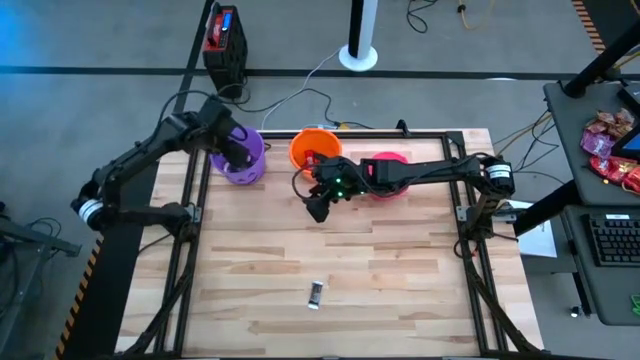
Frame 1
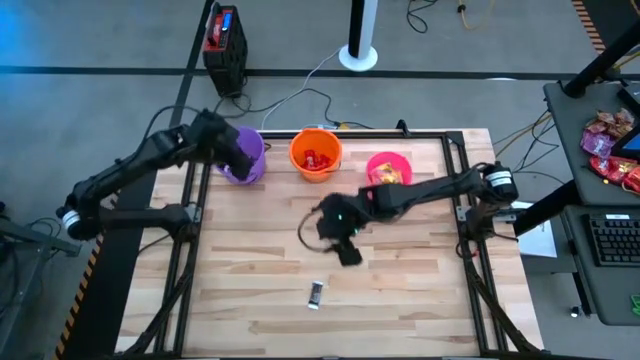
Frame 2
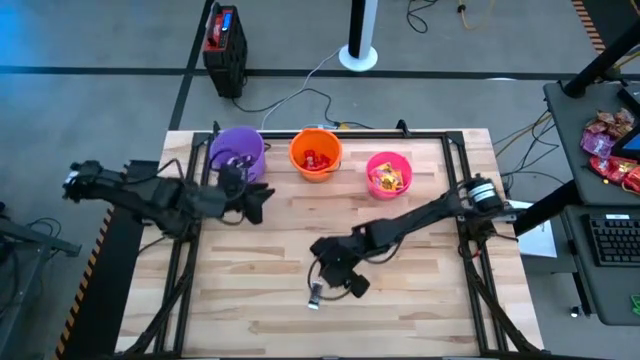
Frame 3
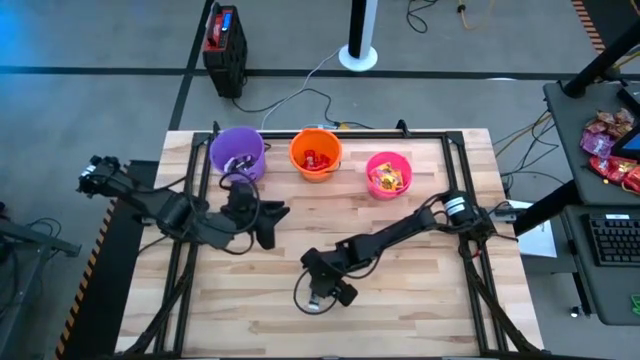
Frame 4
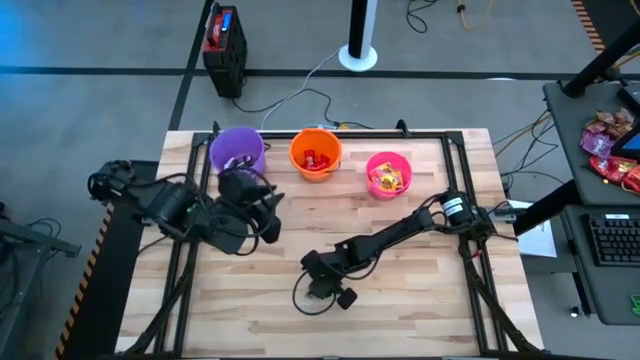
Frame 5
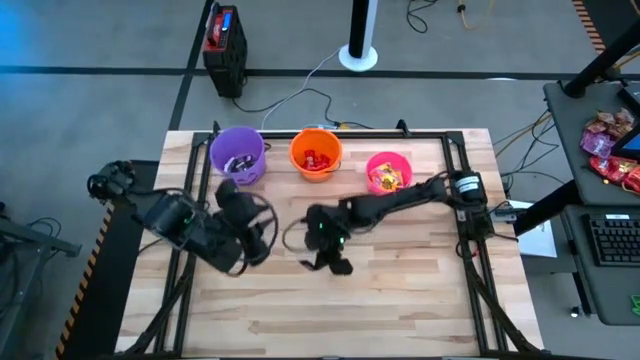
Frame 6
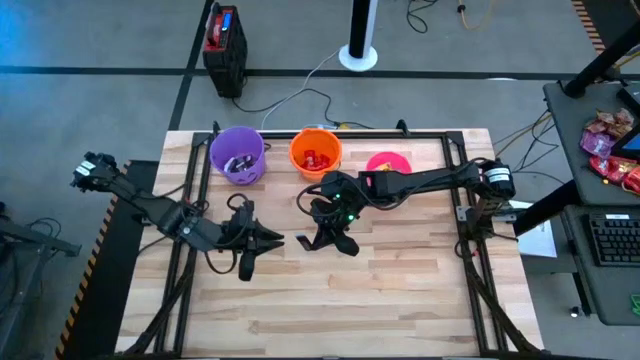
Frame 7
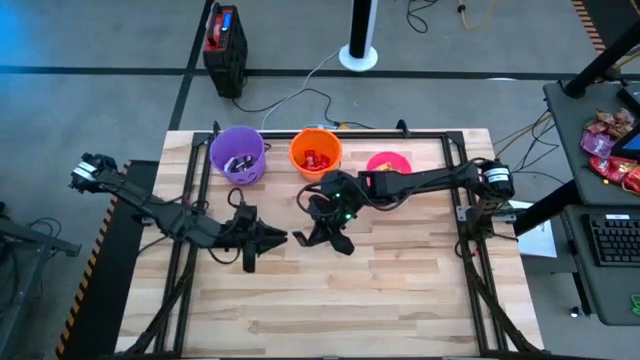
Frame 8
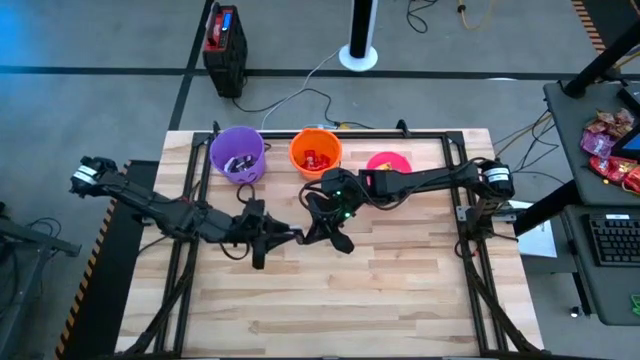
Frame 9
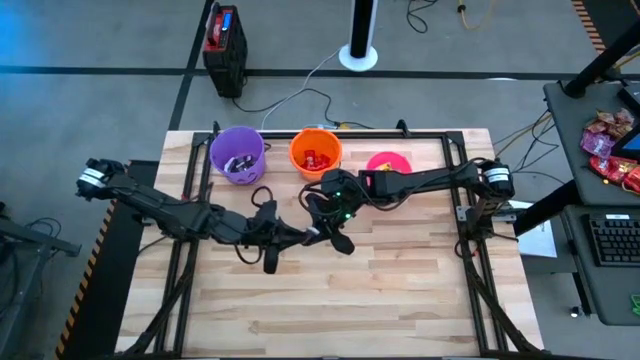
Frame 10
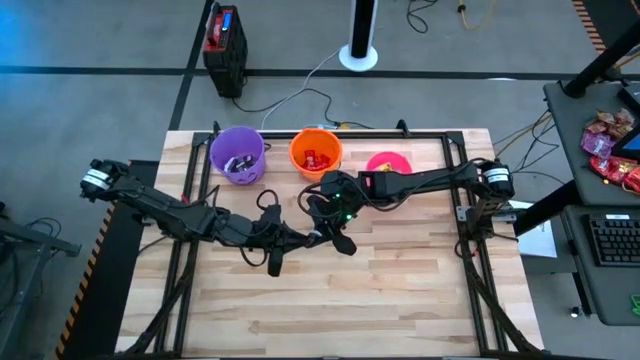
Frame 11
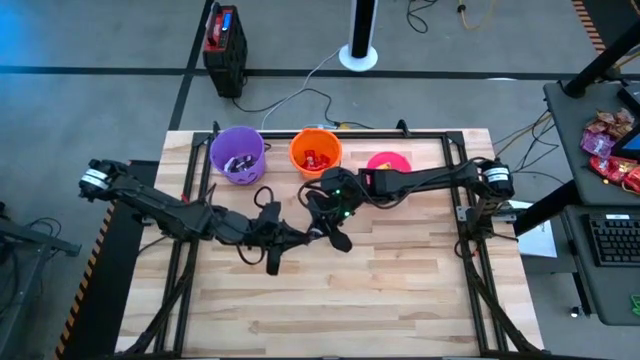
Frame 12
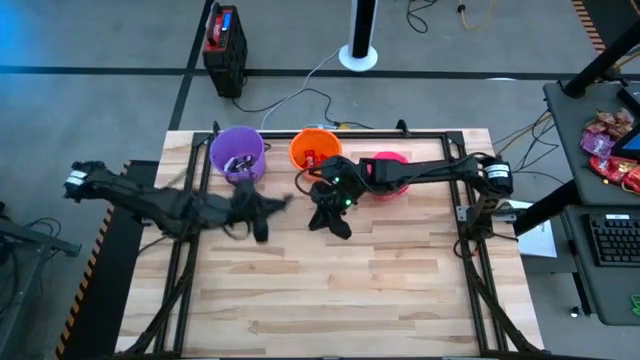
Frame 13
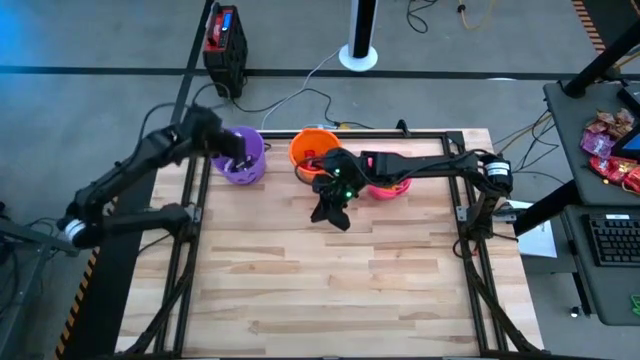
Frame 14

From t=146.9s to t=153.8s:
Task: Sort candy by brand, put in halloween buckets
Put the black candy into the purple bucket

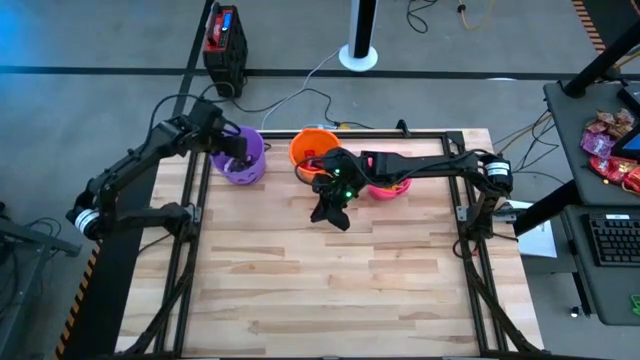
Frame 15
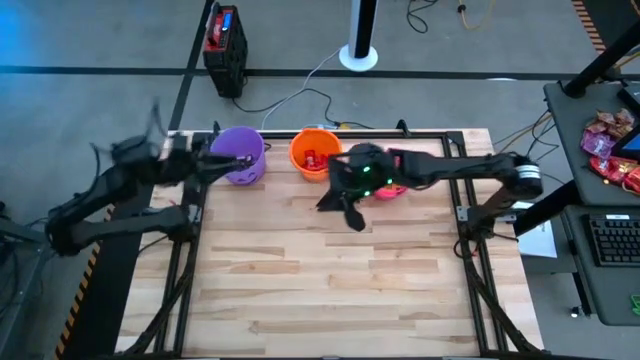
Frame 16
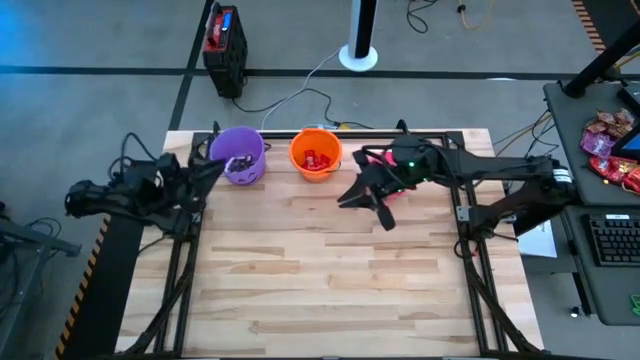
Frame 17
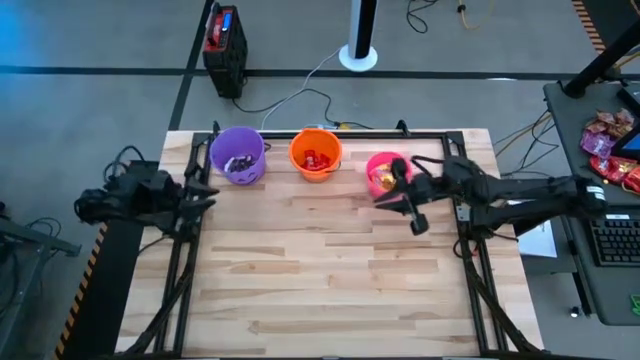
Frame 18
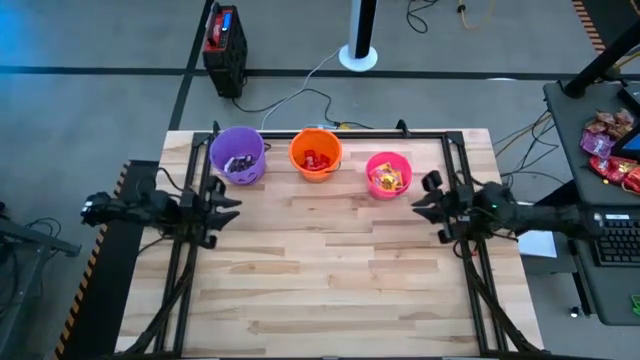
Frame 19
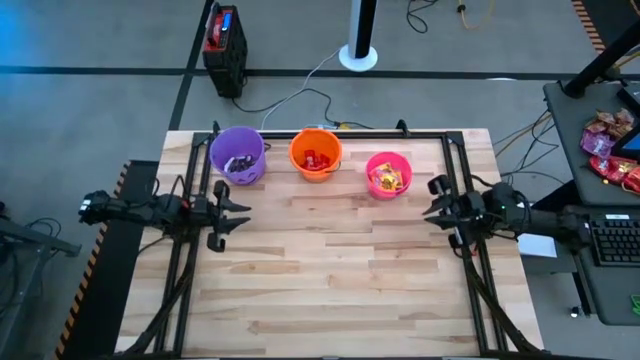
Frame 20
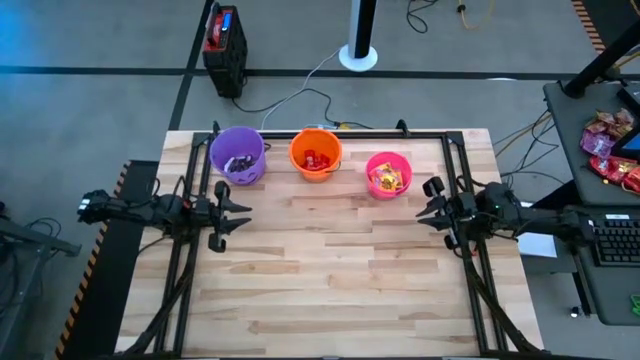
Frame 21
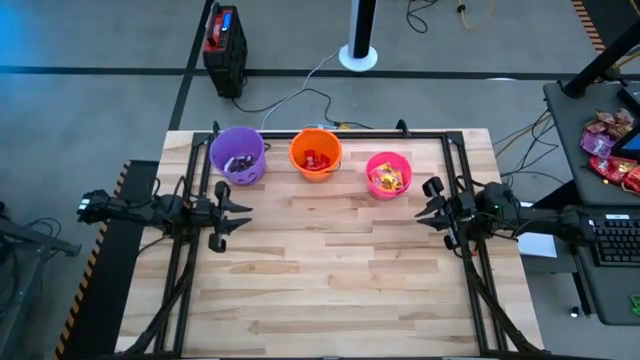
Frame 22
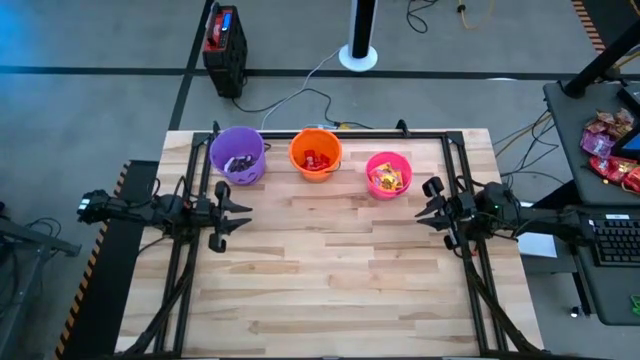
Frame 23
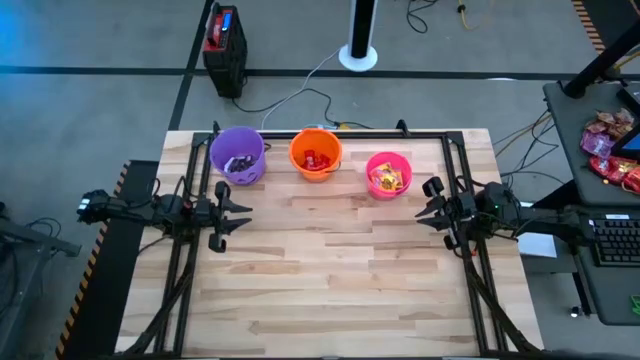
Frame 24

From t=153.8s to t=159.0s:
Return to Home Position

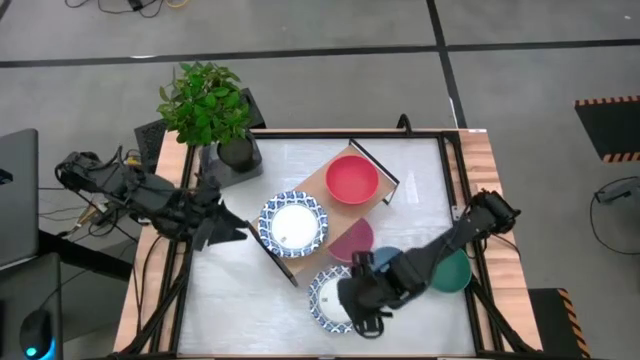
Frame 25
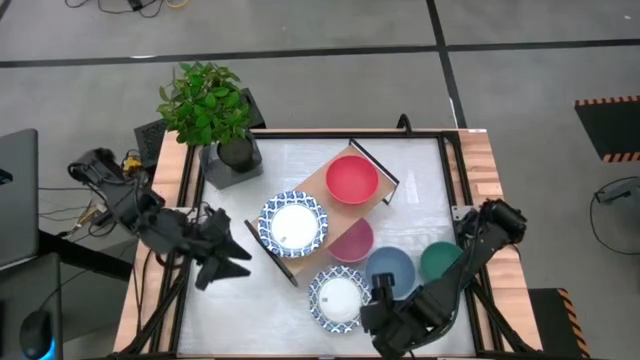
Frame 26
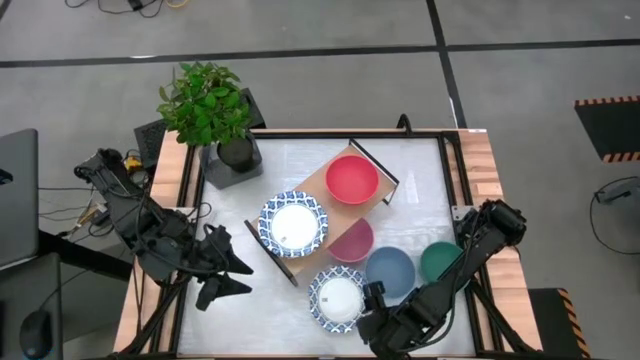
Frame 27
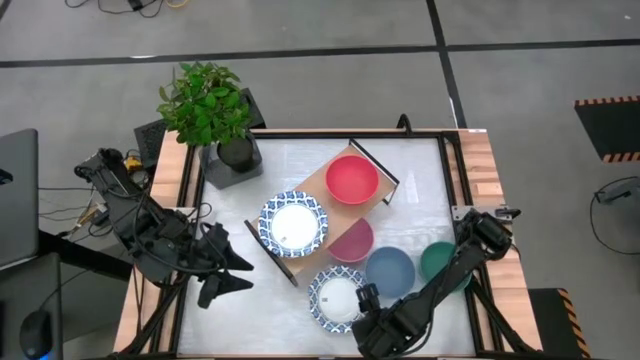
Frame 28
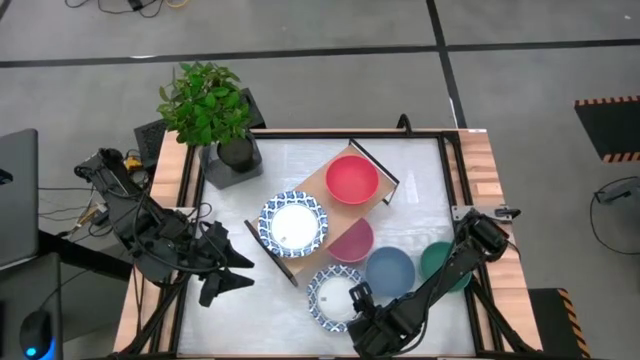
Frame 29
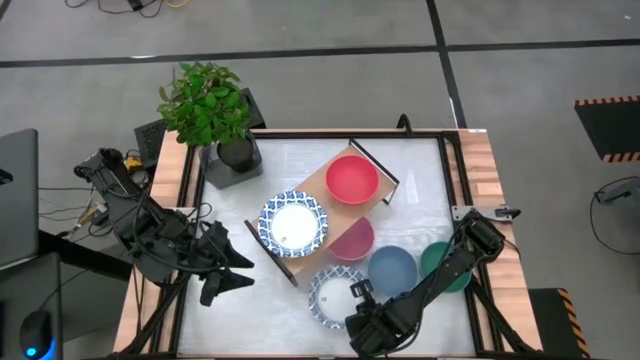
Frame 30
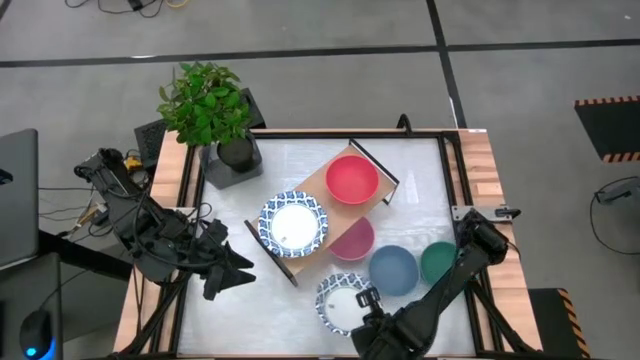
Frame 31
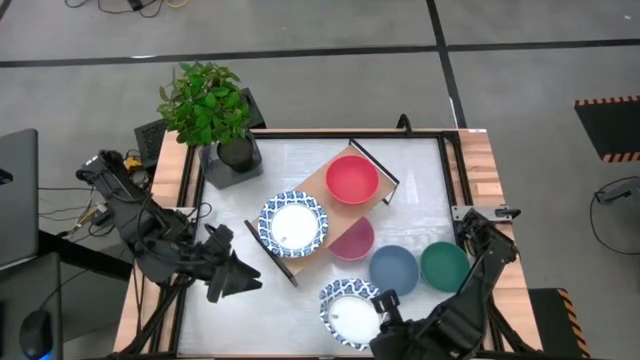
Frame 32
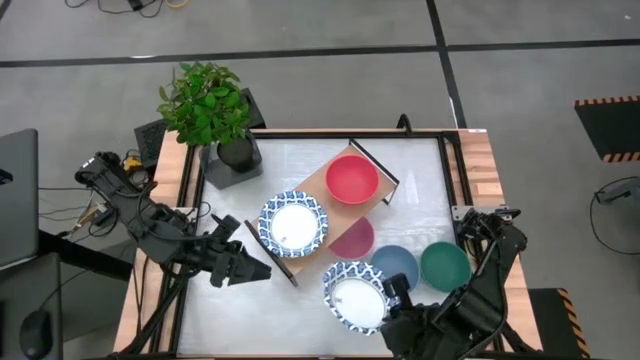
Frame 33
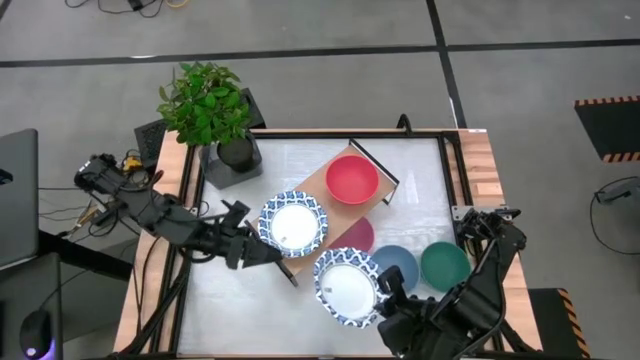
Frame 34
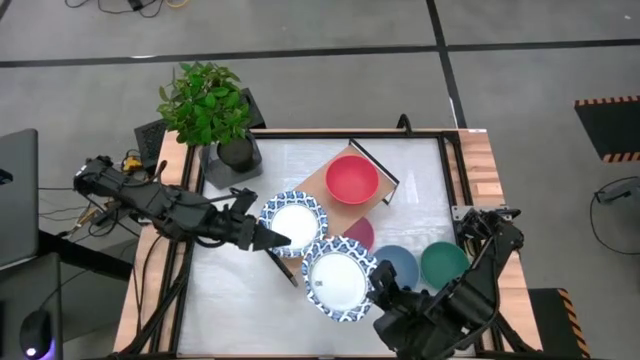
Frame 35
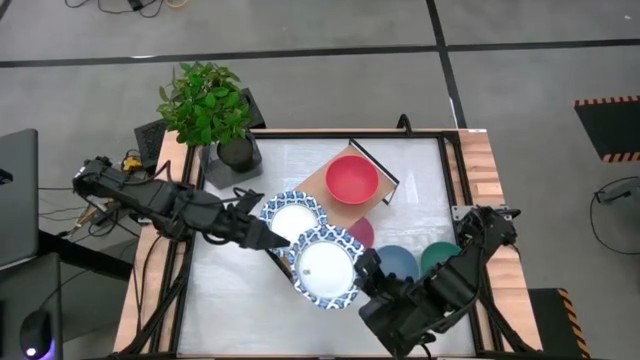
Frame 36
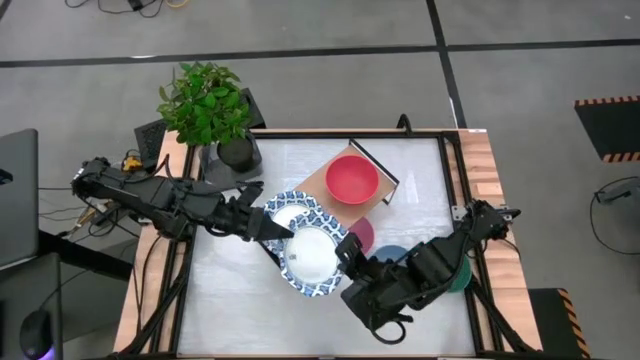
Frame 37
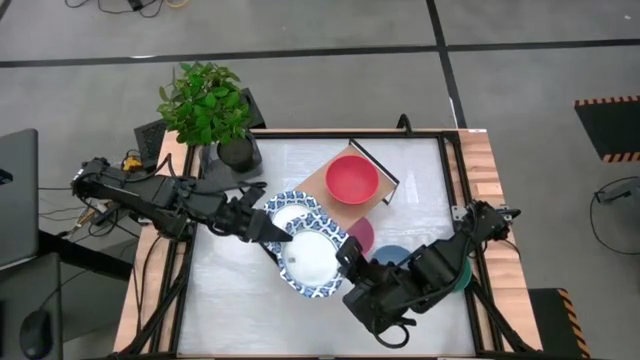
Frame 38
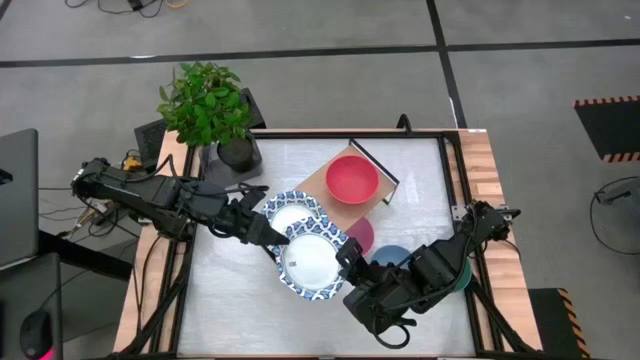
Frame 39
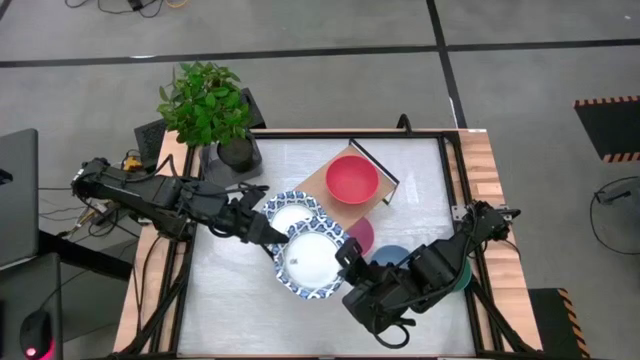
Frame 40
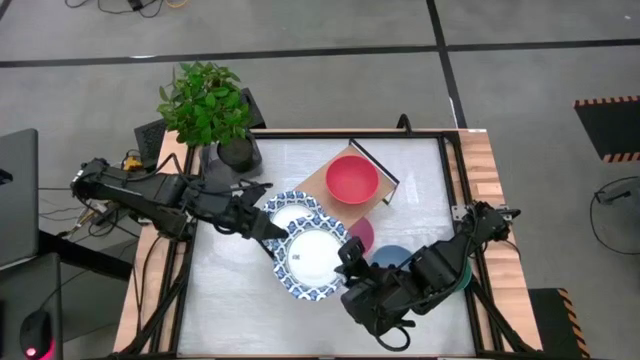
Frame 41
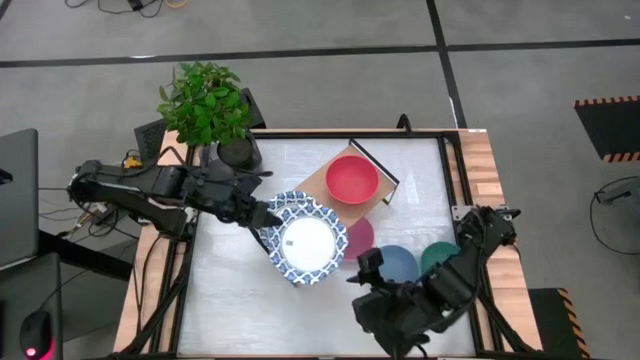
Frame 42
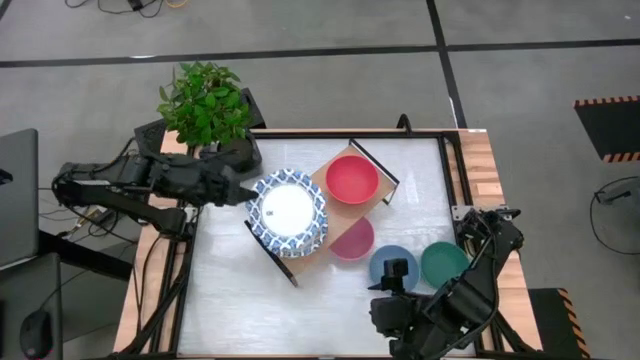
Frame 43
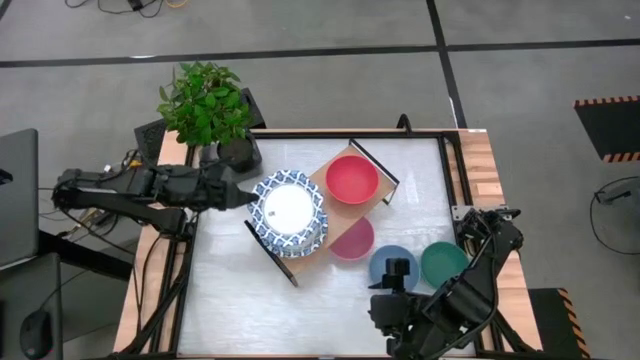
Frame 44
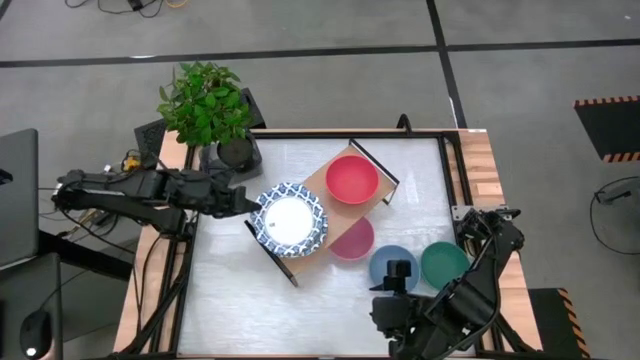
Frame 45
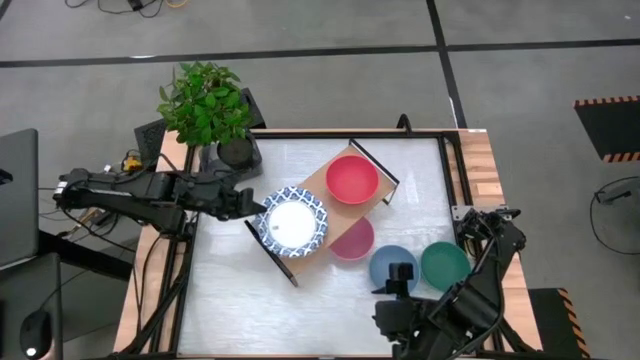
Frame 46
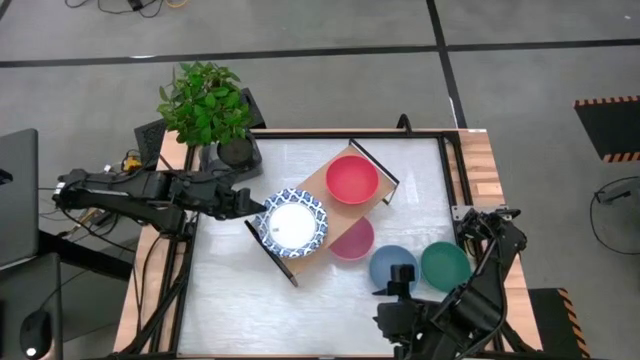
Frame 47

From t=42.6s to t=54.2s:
Task: Place and stack bowls onto a shelf
Stack the white patterned bowl on top of the white patterned bowl on the shelf
